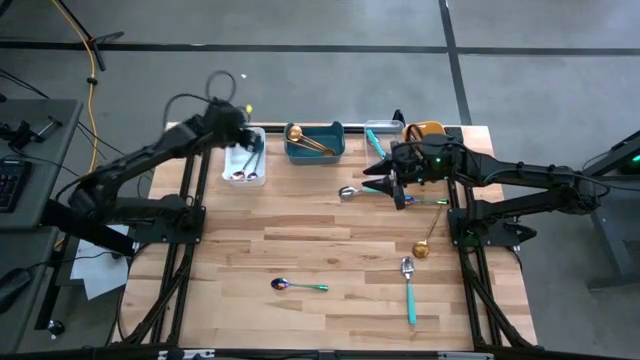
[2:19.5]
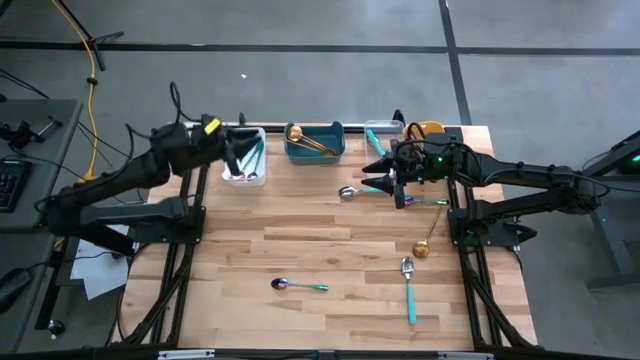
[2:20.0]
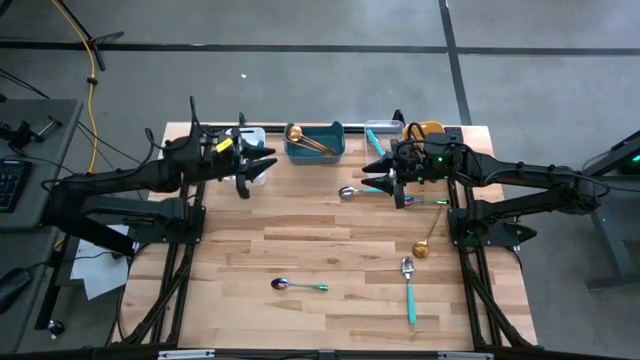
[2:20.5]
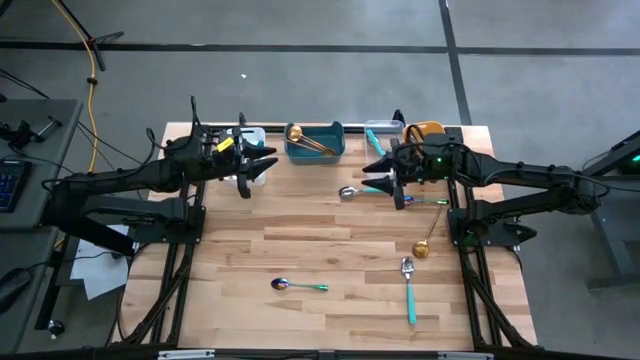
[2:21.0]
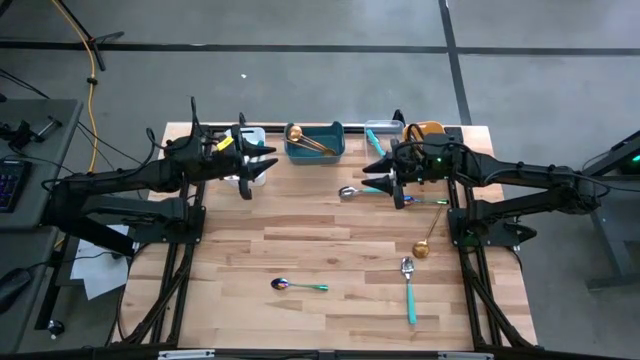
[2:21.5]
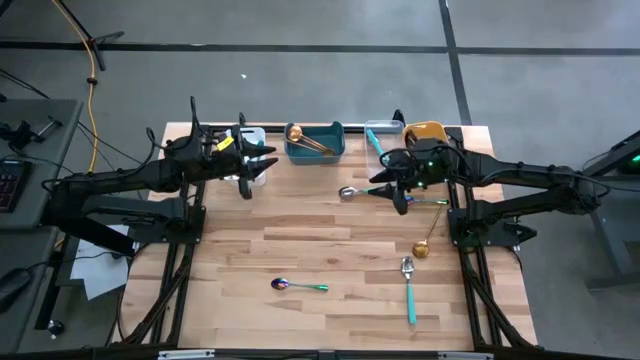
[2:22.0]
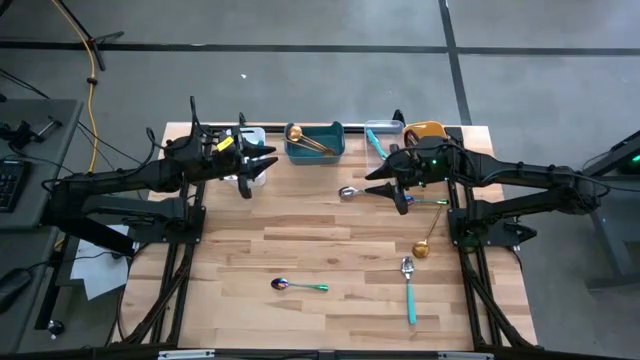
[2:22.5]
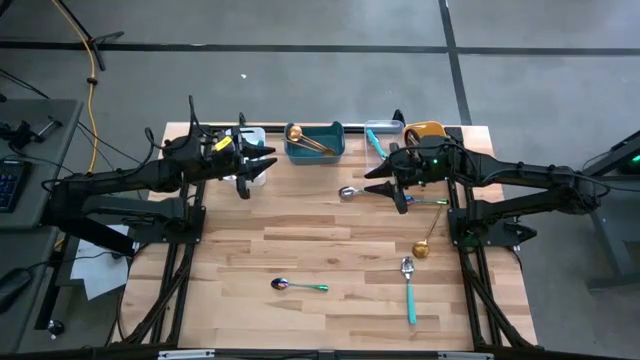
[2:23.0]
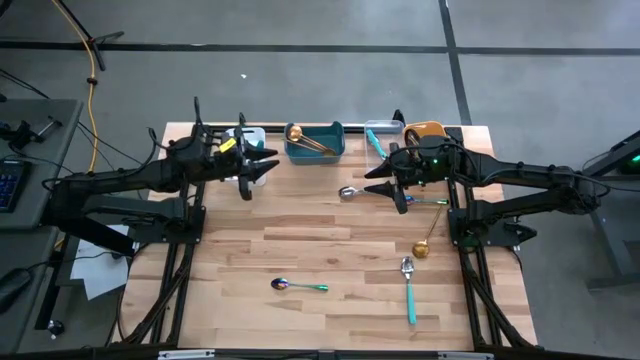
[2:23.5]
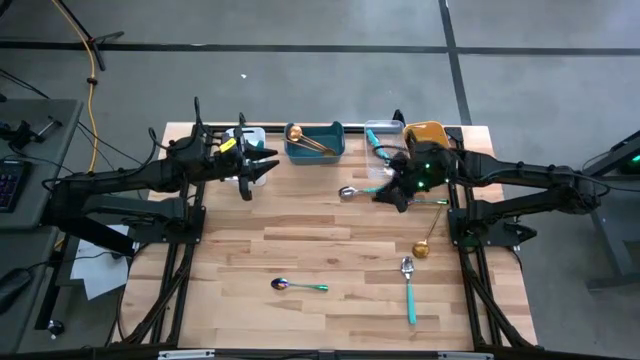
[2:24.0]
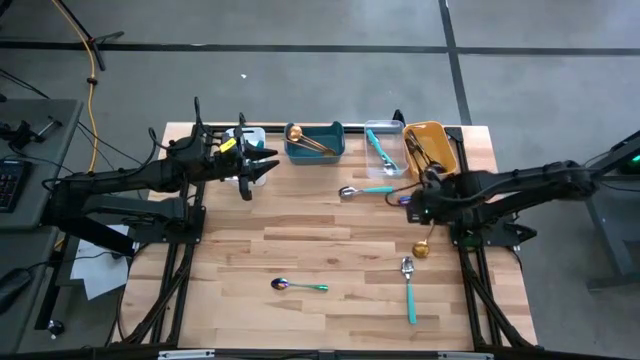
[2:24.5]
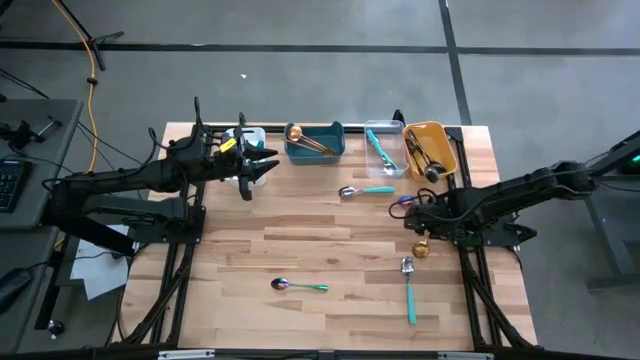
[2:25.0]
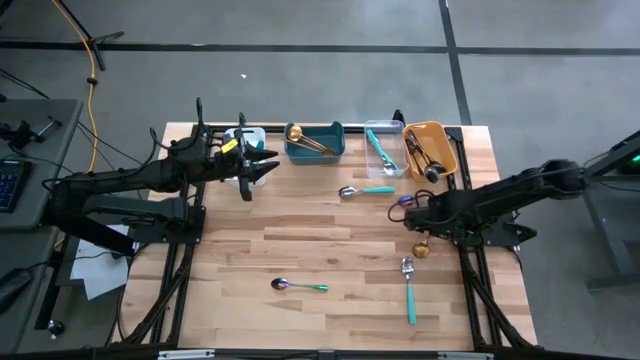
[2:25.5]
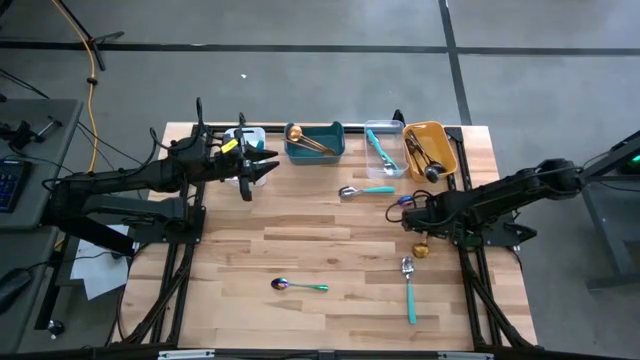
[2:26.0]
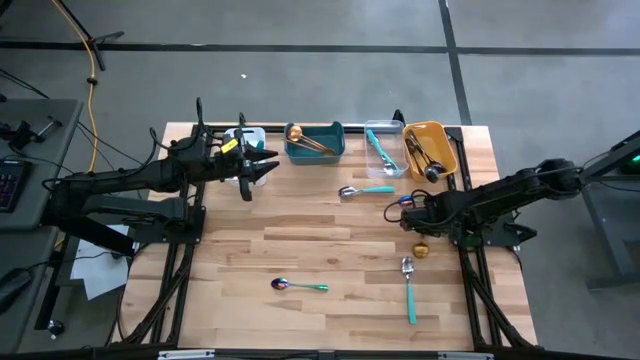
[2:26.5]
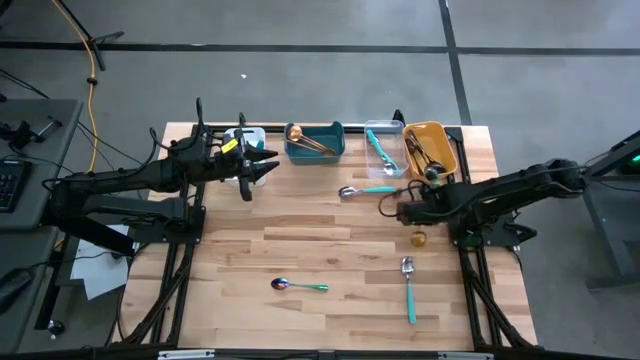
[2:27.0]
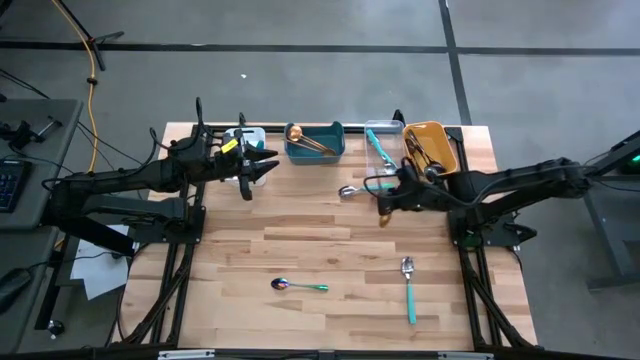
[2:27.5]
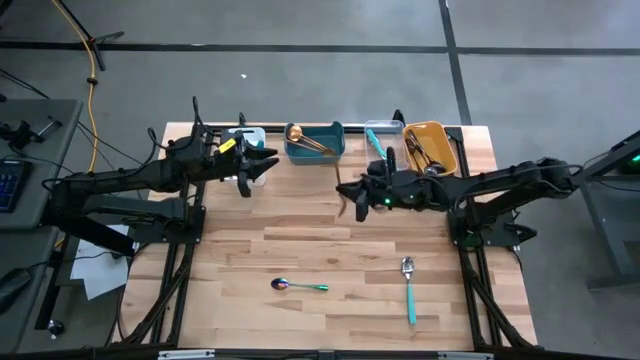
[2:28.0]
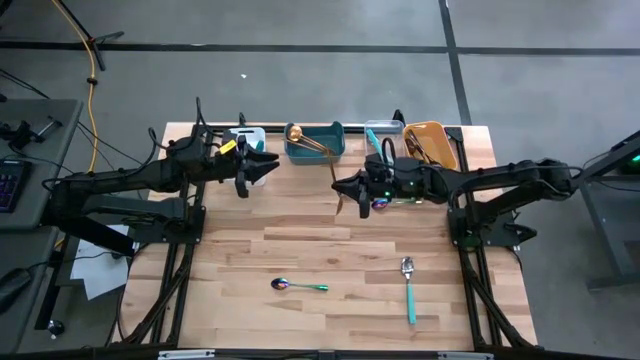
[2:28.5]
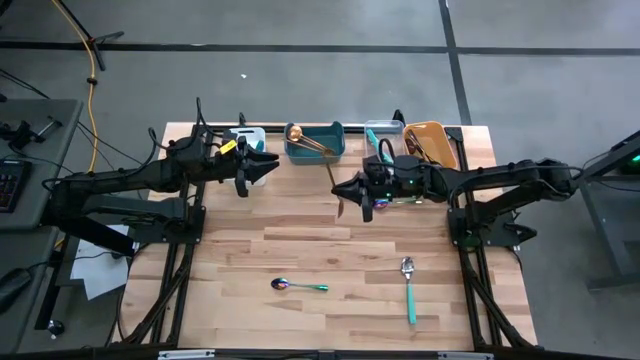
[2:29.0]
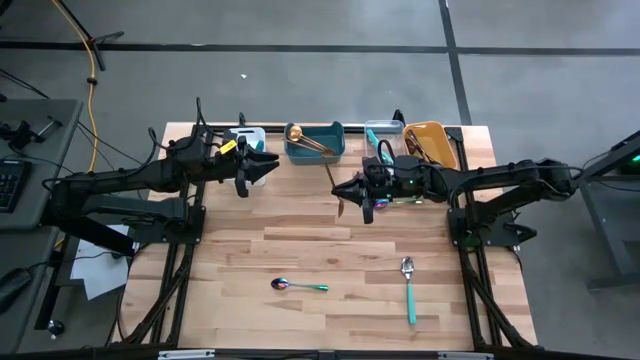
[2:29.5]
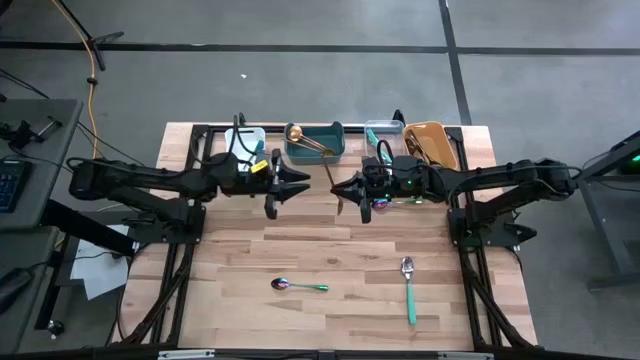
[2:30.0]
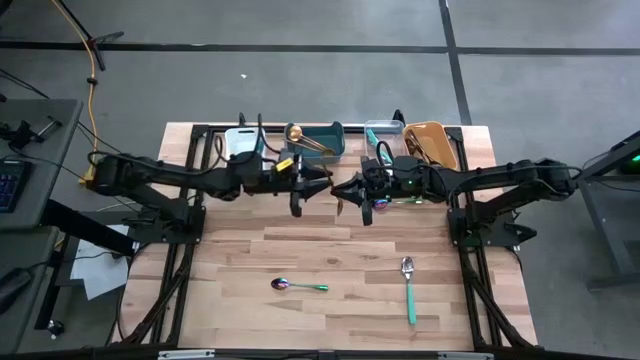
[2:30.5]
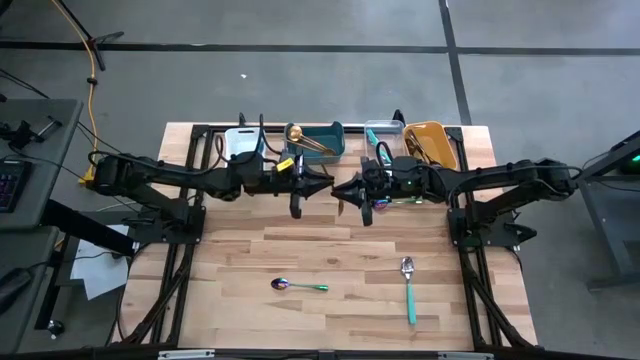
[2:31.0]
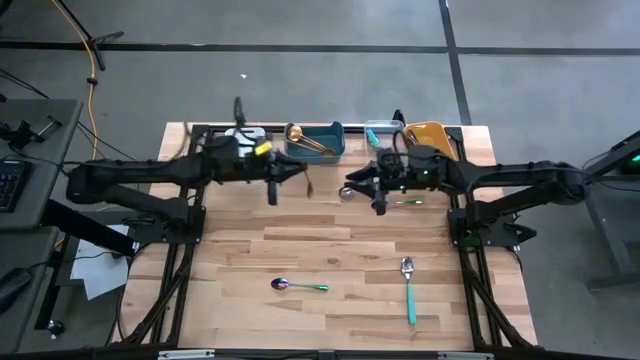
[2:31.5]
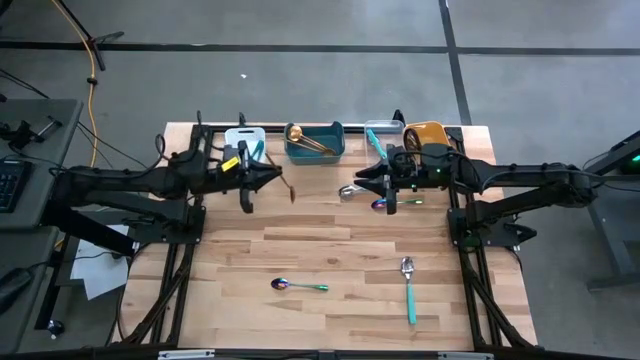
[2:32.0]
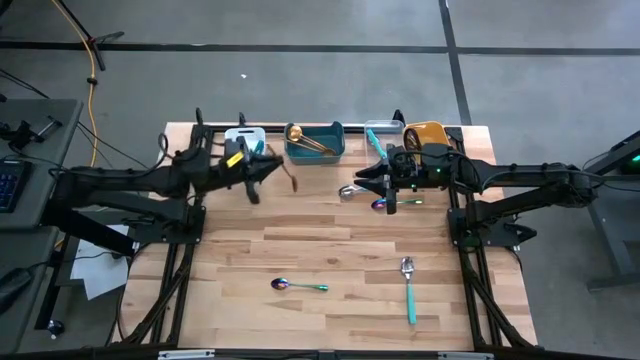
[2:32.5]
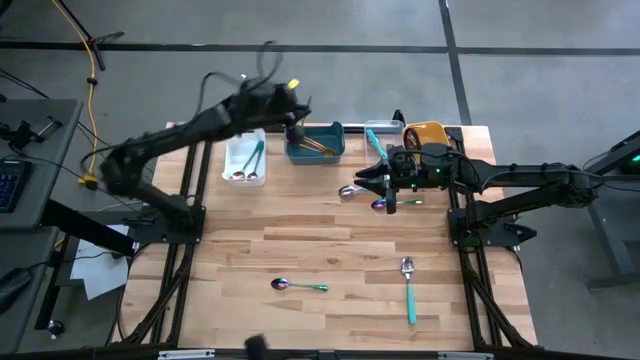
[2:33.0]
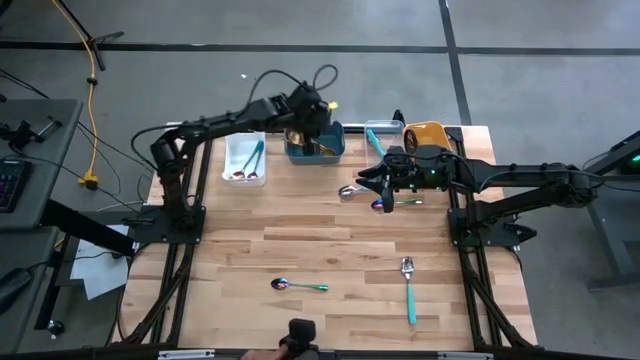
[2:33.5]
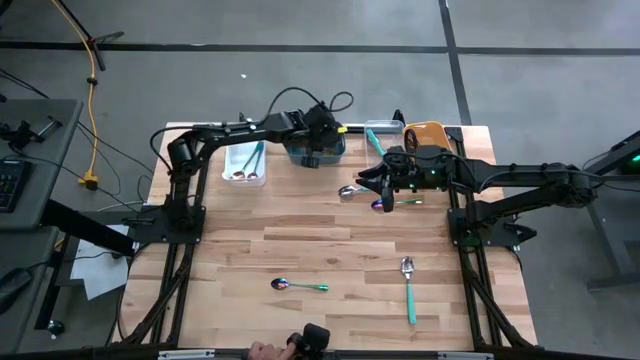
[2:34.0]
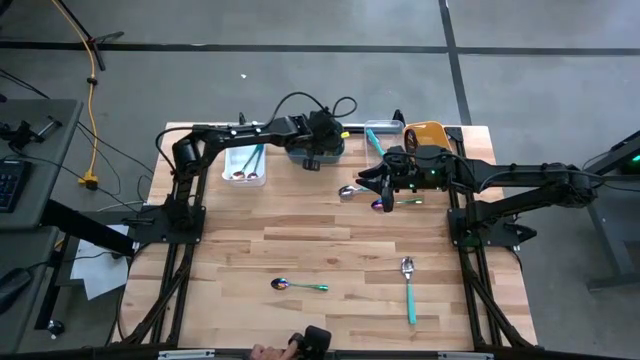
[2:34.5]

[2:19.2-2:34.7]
Task: Sort silverware by color (type)
Put the gold spoon into the blue bin

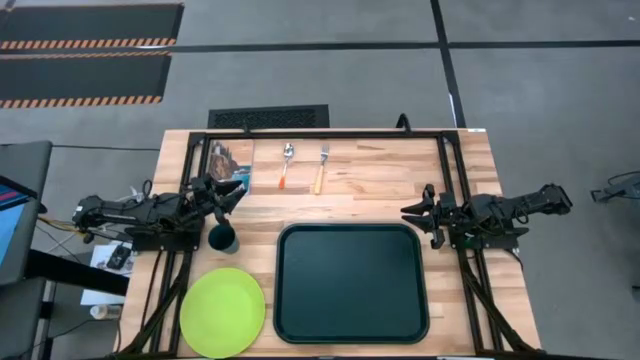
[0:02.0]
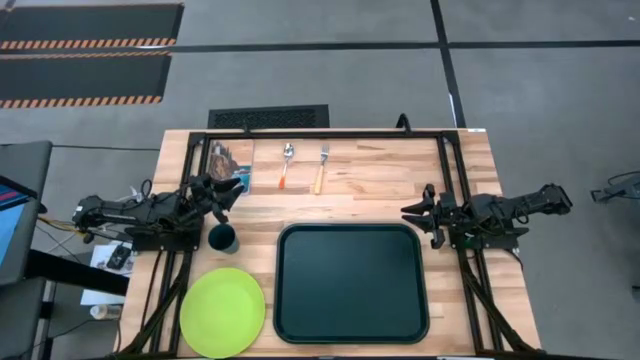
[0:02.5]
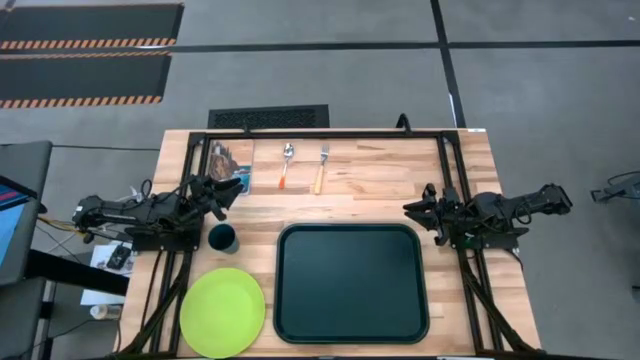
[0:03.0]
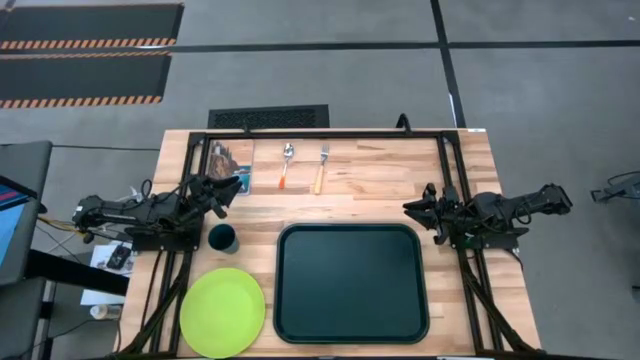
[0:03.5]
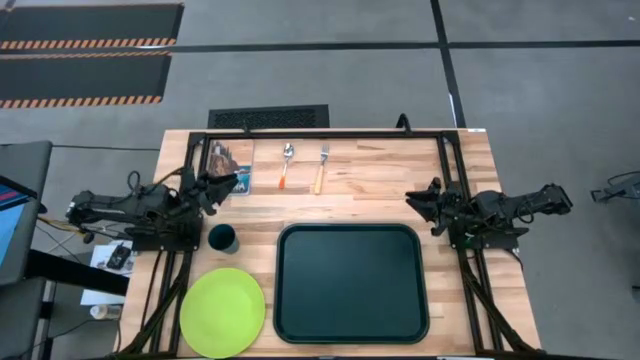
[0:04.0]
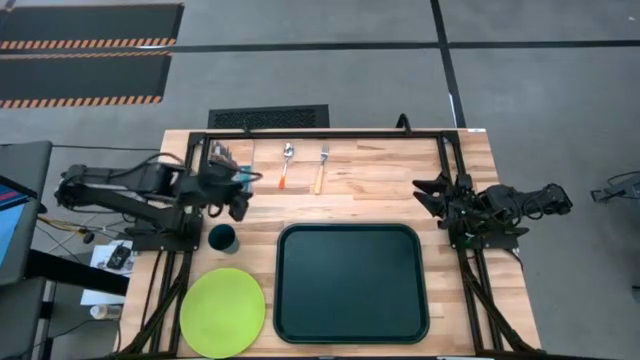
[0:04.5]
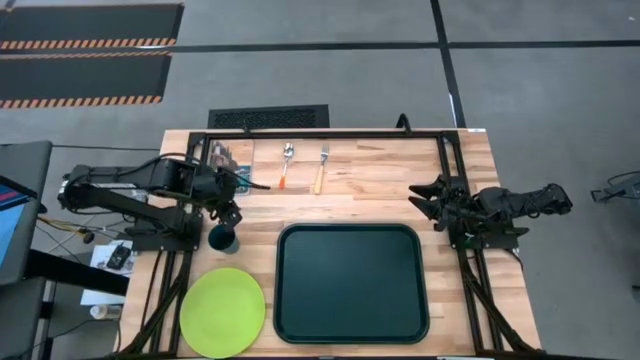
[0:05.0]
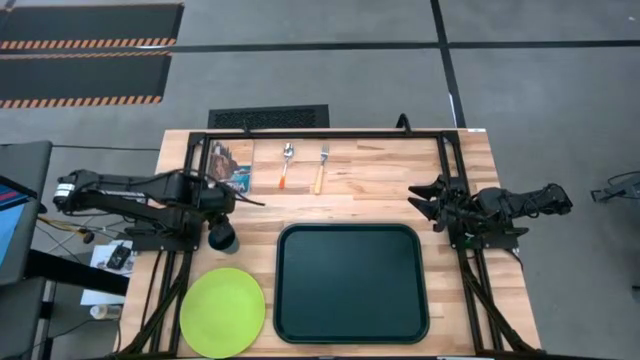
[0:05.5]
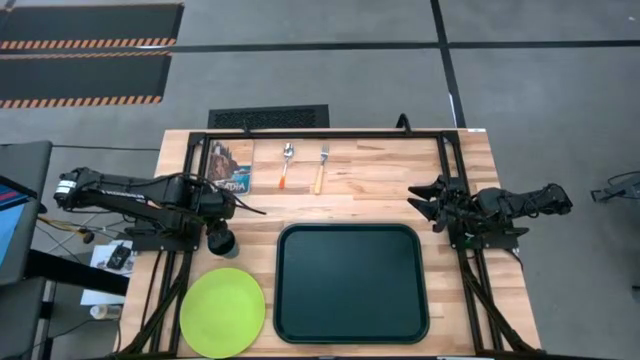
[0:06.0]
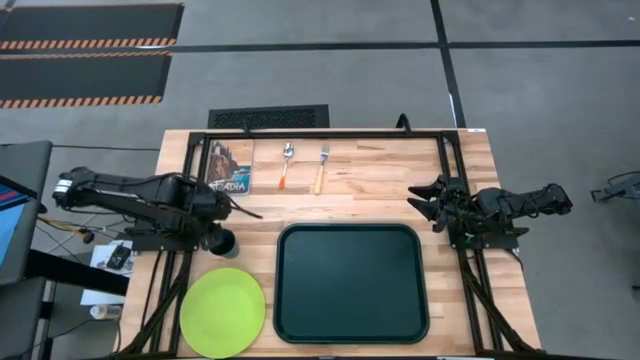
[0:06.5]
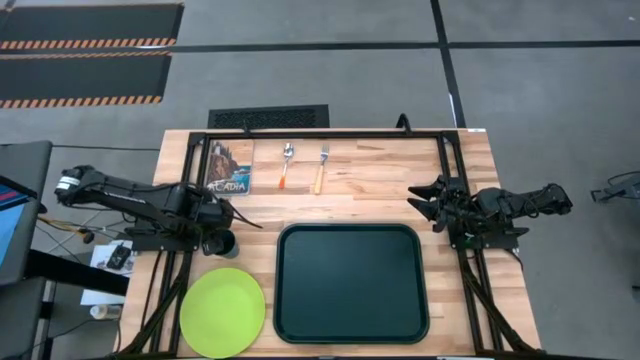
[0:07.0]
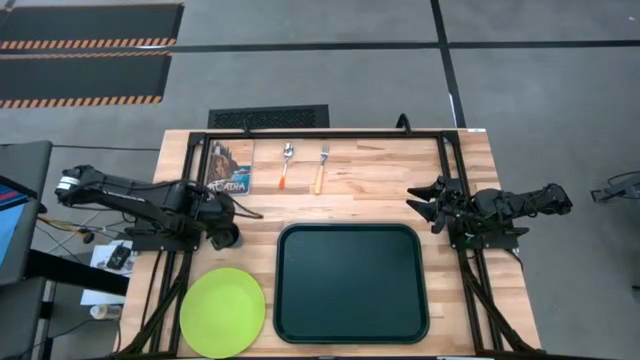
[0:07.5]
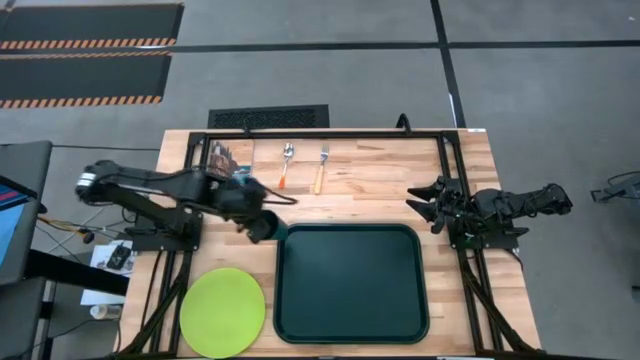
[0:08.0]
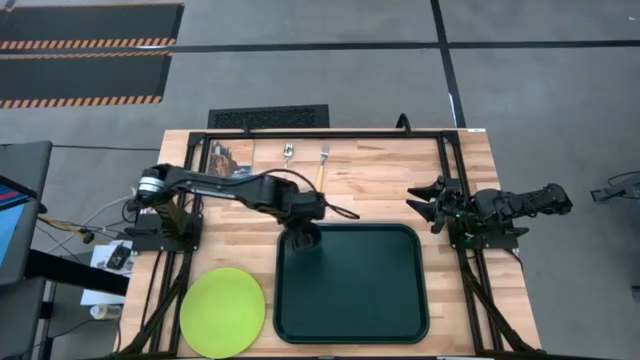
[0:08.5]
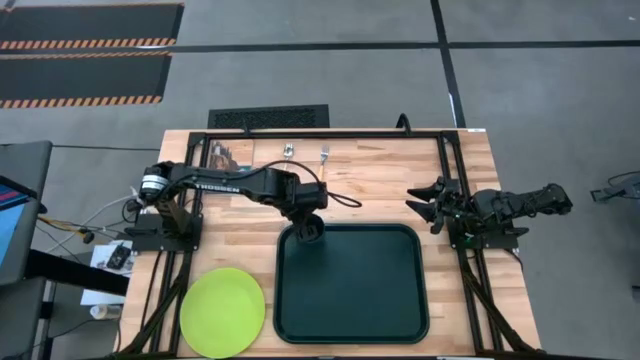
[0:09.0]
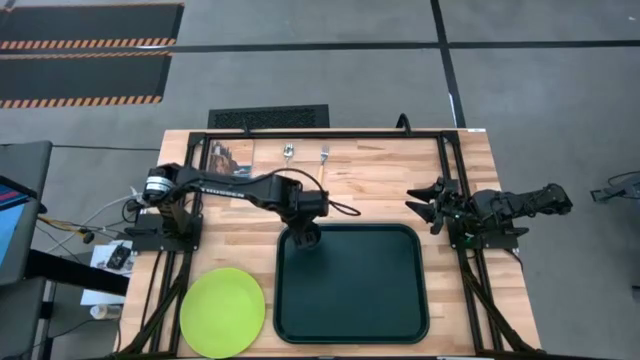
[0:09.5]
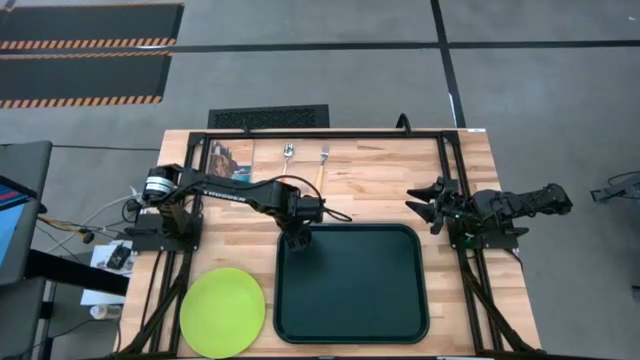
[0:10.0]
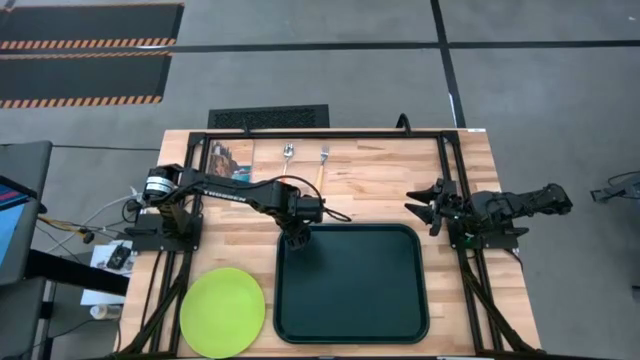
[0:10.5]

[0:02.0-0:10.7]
Task: Pick and place plate/cup/fork/spoon on tray
Put the dark blue cup on the top left of the black tray
